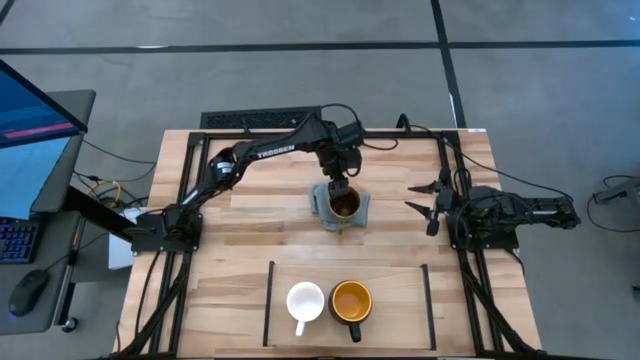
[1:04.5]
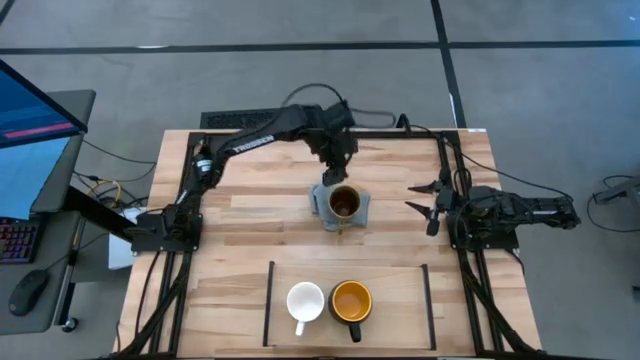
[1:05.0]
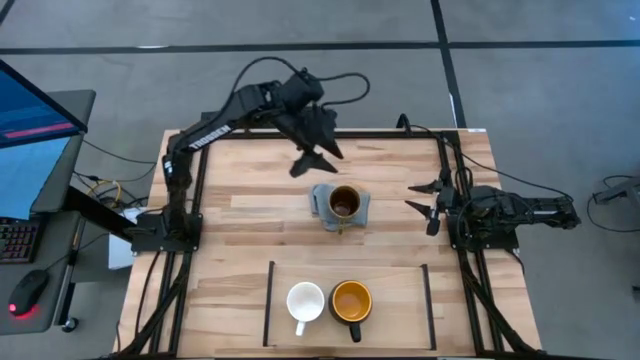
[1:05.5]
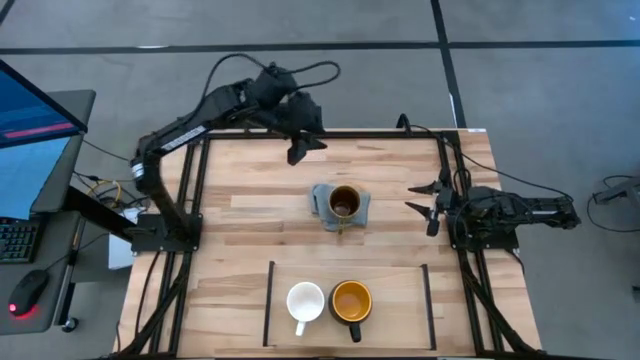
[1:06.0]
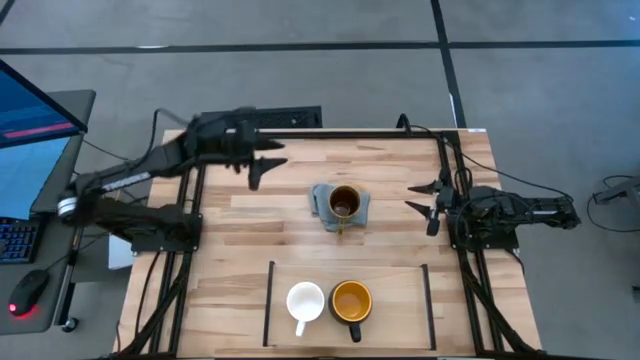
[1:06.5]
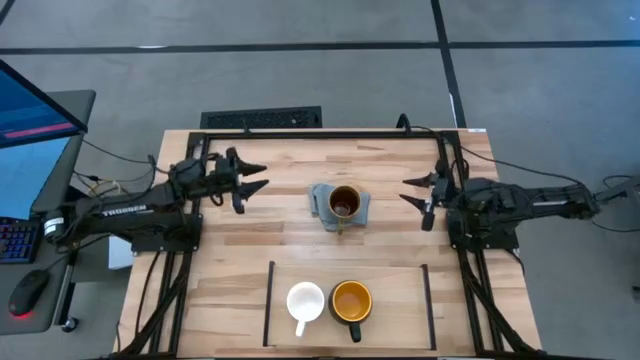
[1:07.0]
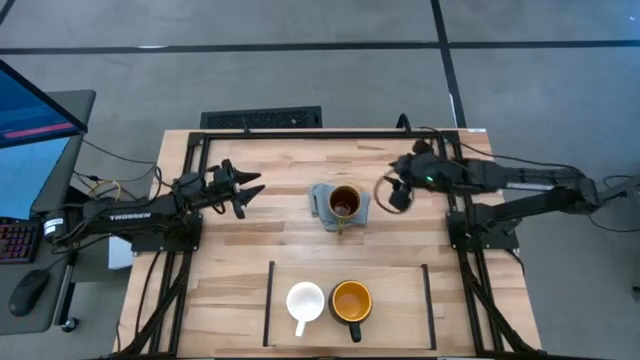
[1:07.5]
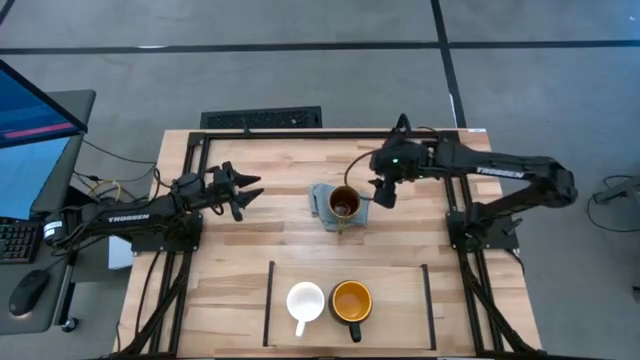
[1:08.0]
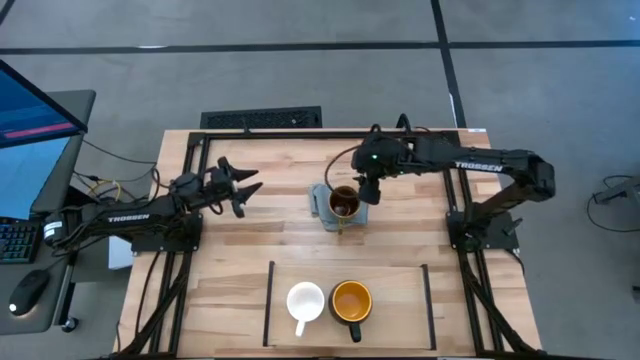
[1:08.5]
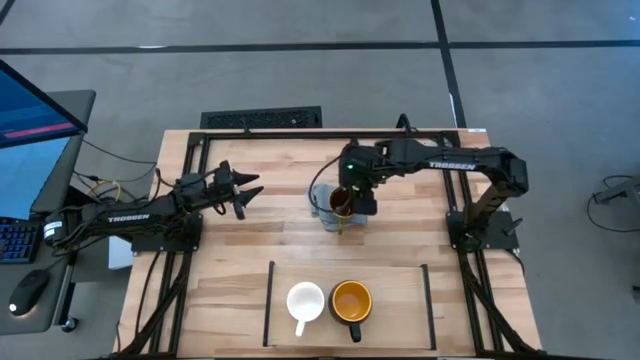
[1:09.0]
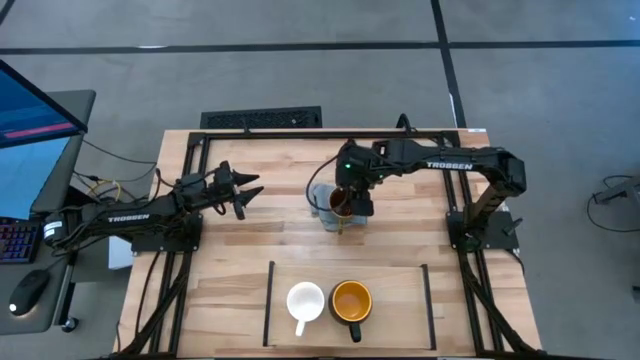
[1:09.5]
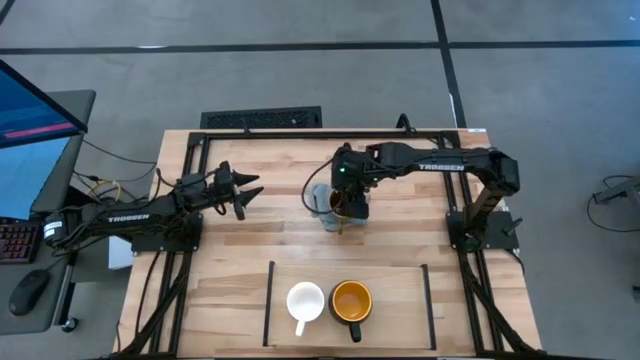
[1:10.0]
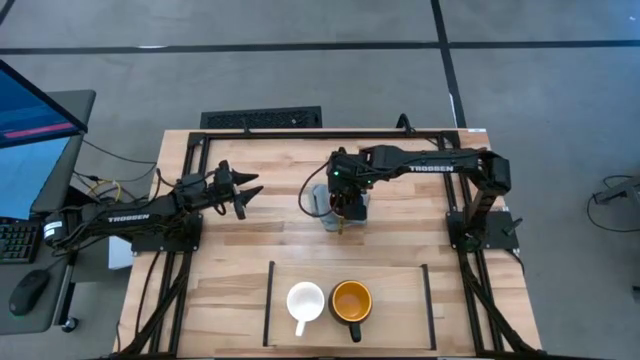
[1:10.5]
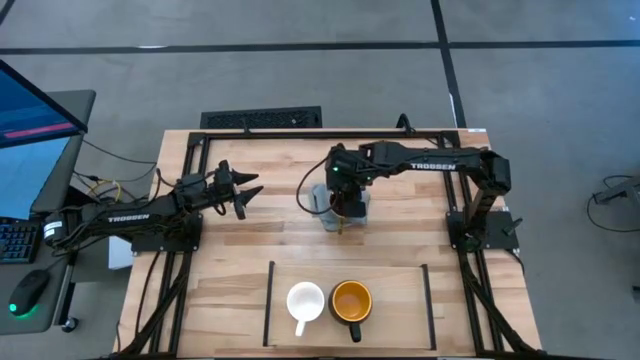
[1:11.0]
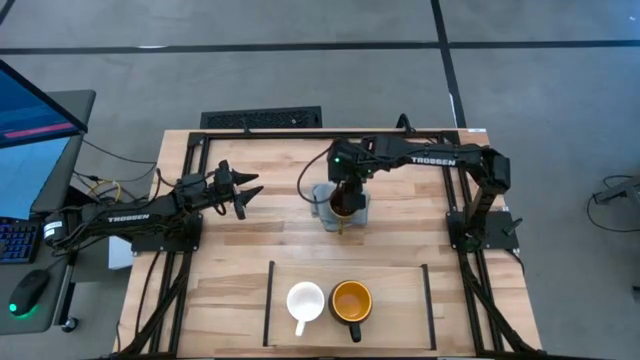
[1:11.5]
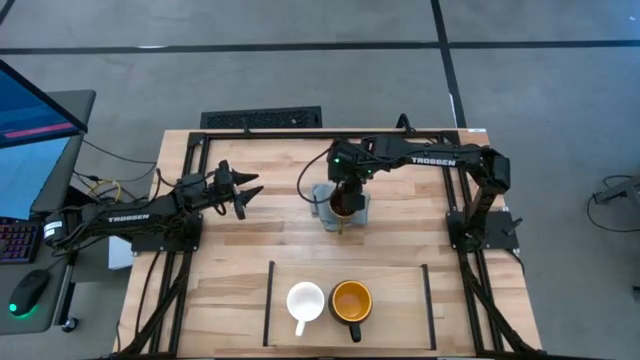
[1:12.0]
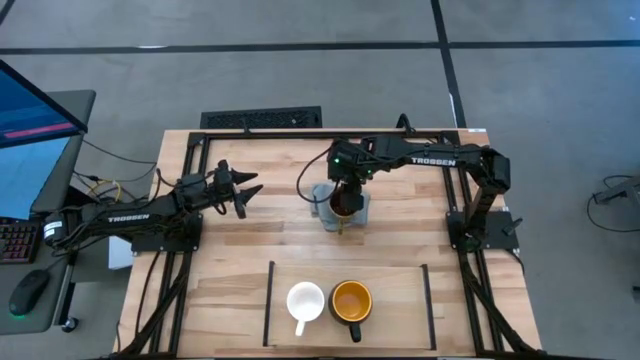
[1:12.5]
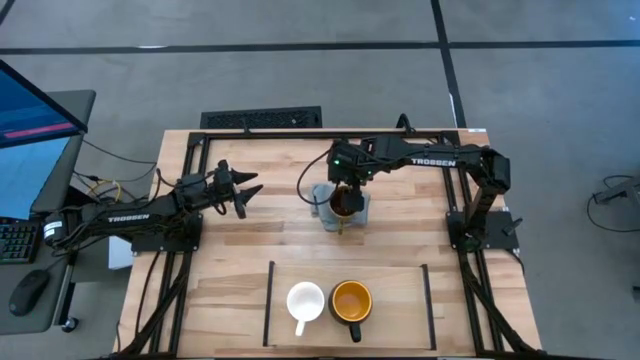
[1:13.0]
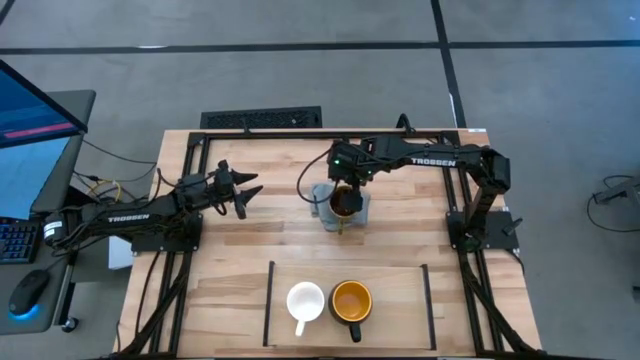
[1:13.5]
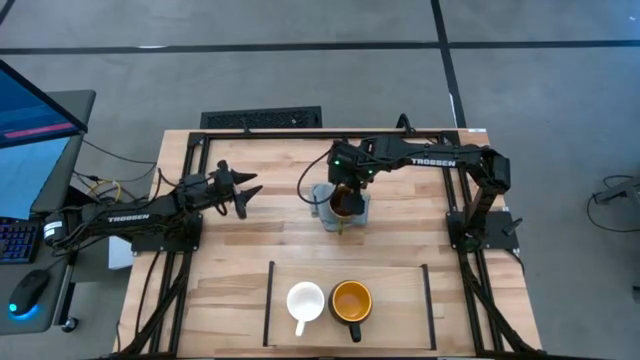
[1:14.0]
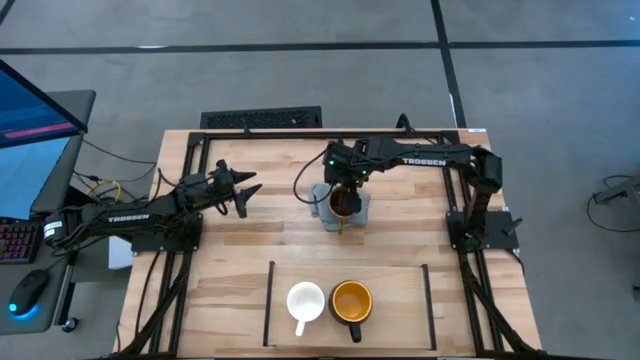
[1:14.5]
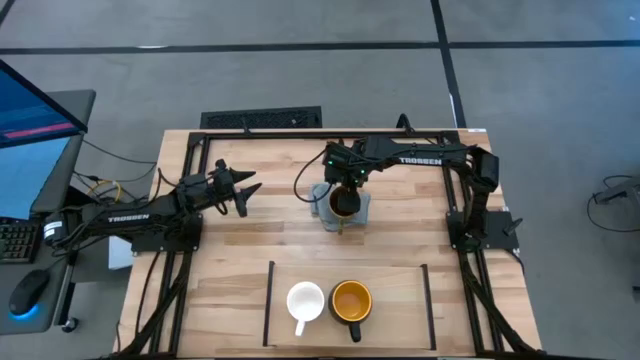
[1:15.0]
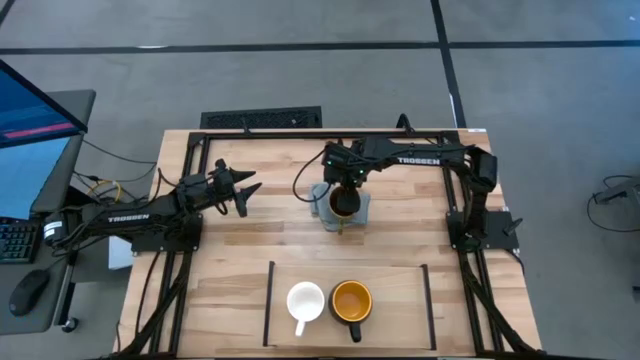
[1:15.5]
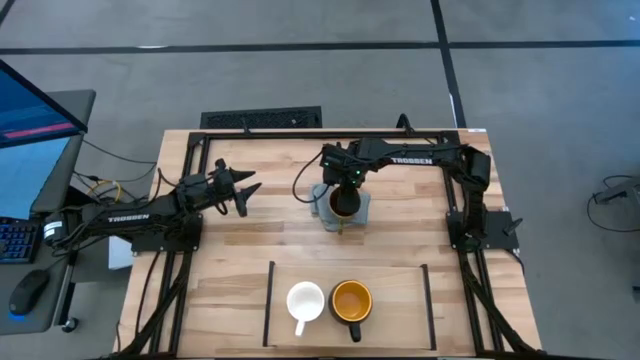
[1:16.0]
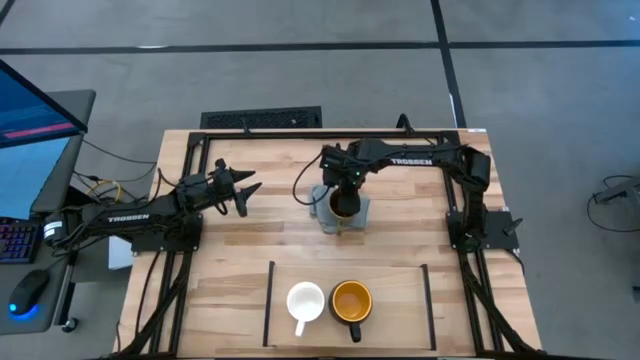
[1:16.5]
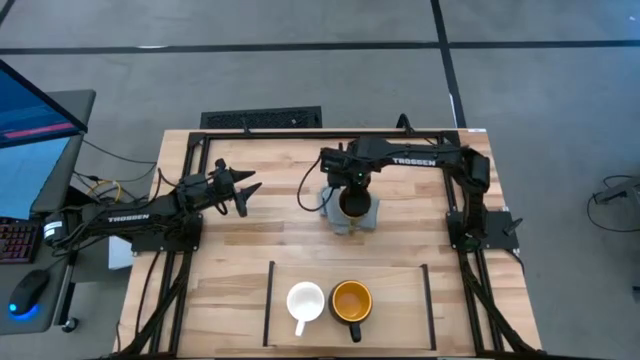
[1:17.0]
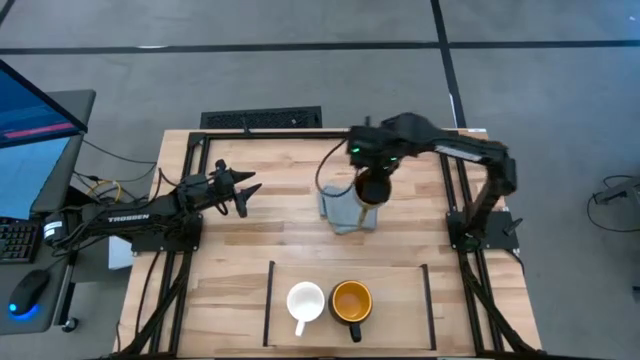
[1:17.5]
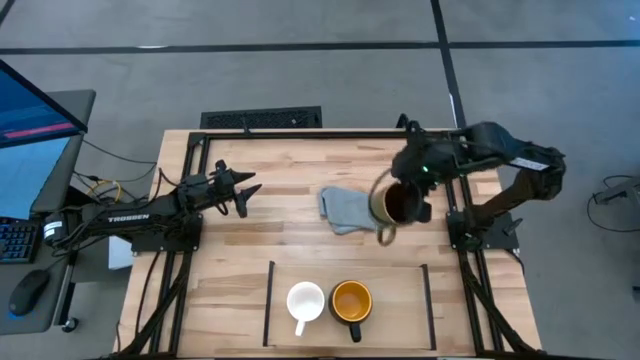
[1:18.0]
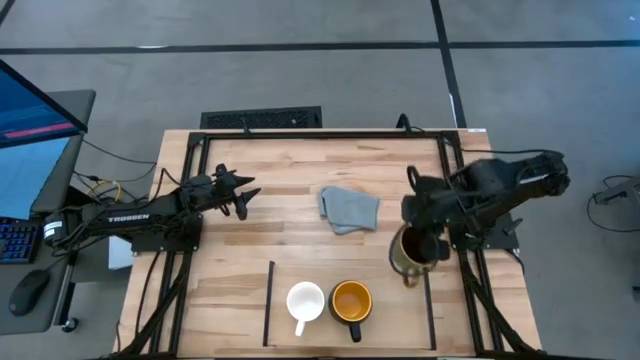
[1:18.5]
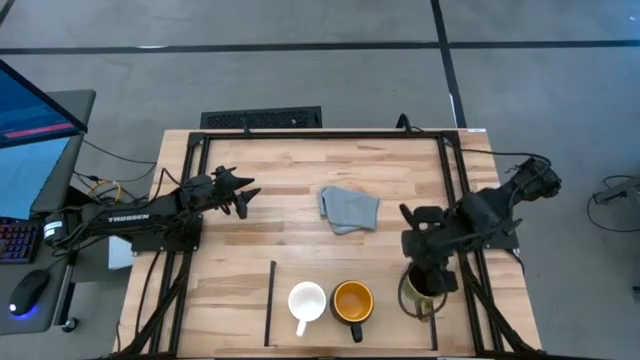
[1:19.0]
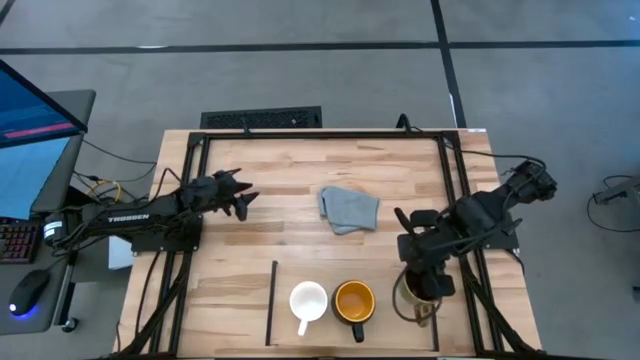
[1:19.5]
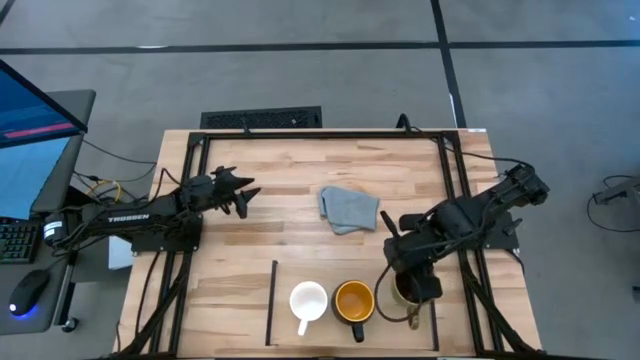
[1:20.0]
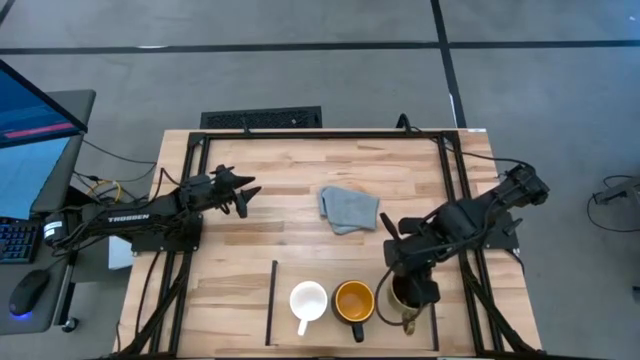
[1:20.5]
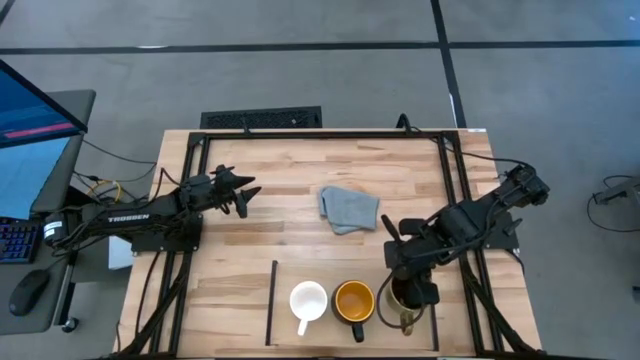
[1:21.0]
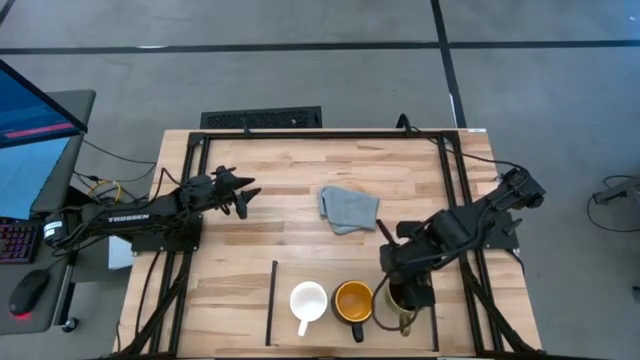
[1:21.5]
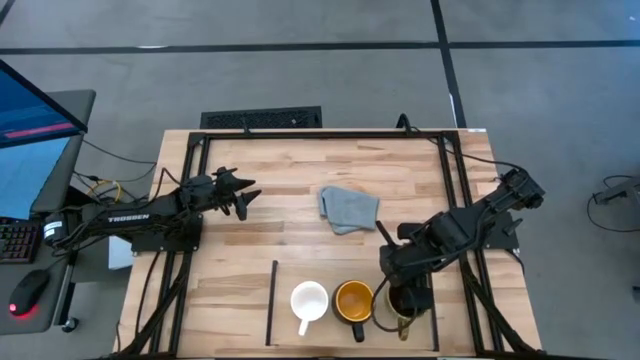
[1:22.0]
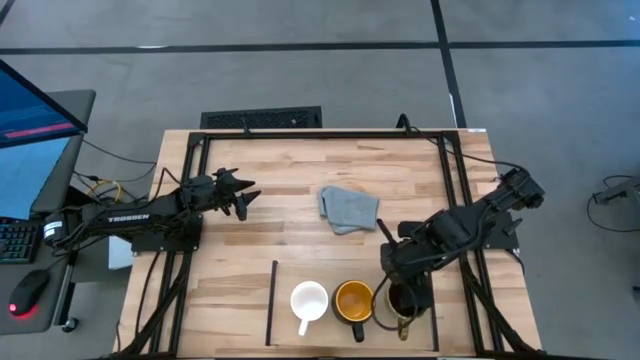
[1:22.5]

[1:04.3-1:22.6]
Task: Stack small to large cups/mugs on shelf
Put the light brown mug on the shelf

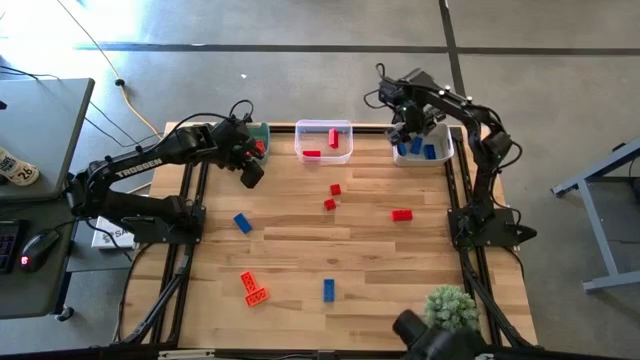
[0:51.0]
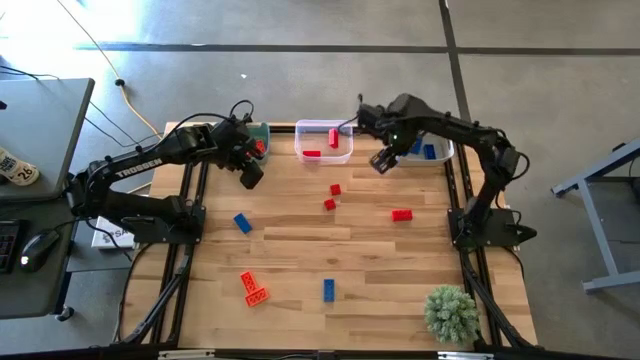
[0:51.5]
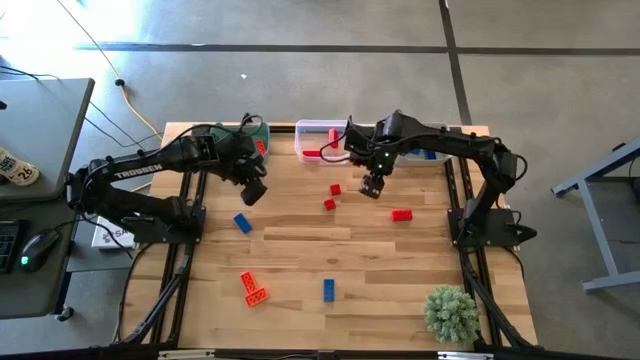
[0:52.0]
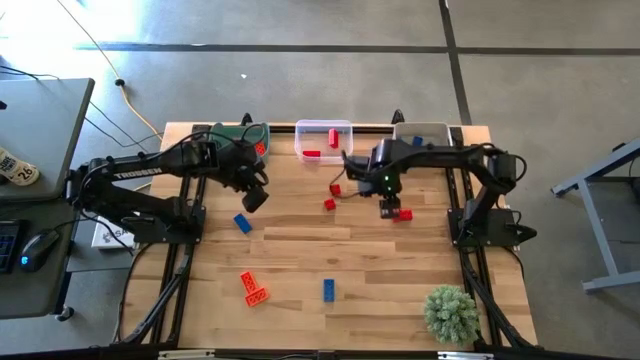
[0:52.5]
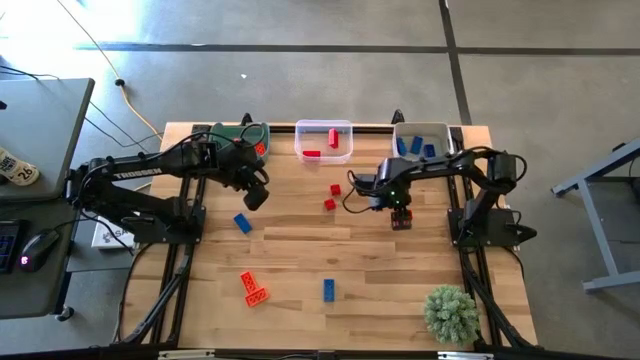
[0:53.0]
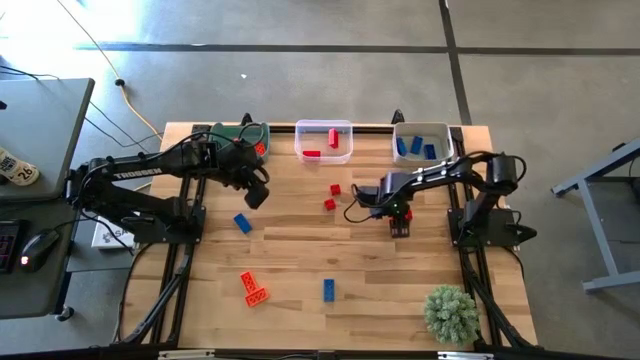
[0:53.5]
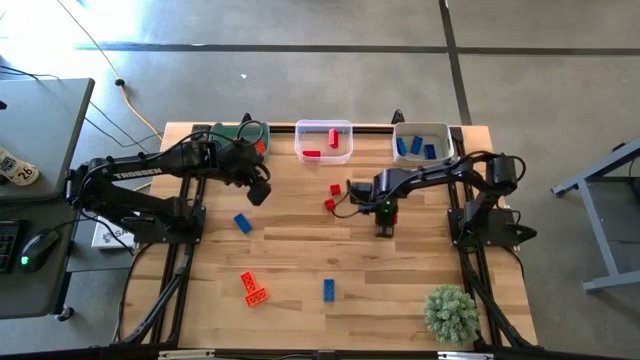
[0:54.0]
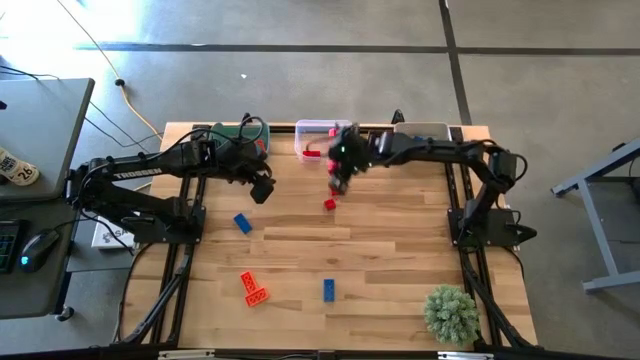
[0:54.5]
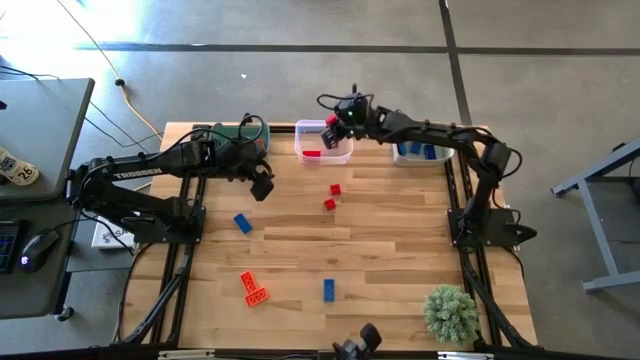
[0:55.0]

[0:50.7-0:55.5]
Task: Sort & place blocks by color
Put the red game piece into the transparent bin
